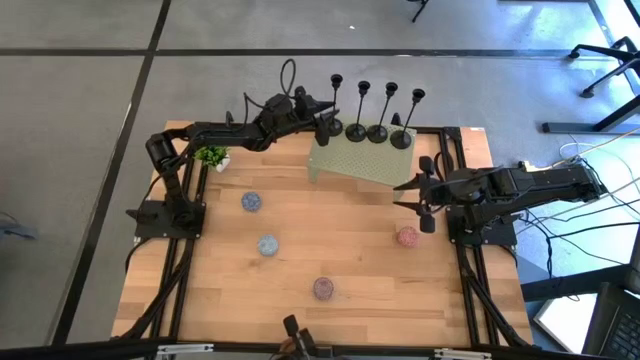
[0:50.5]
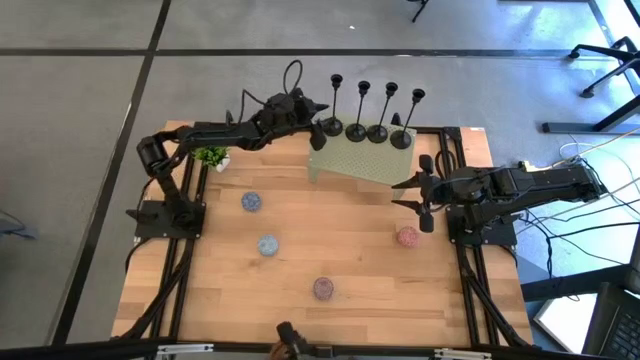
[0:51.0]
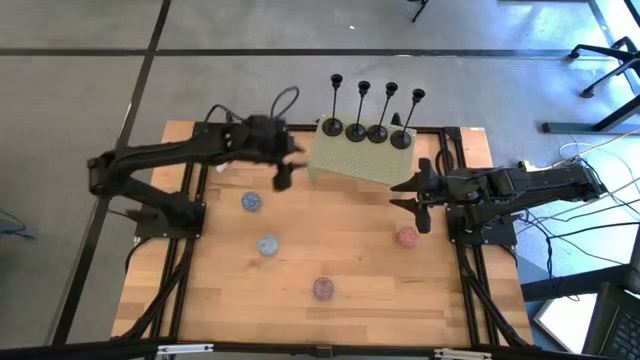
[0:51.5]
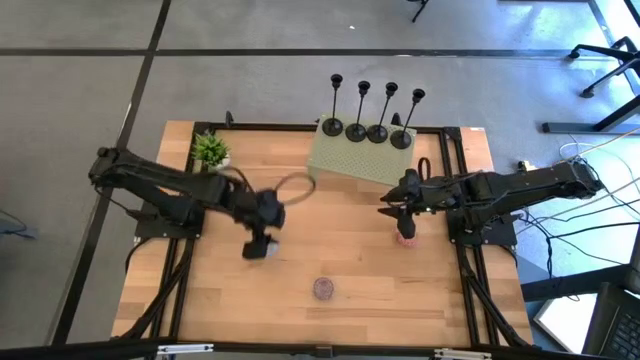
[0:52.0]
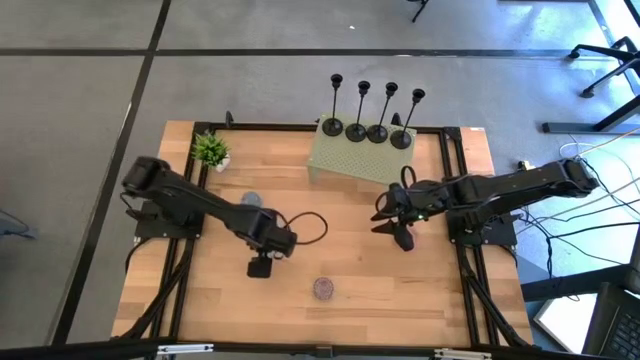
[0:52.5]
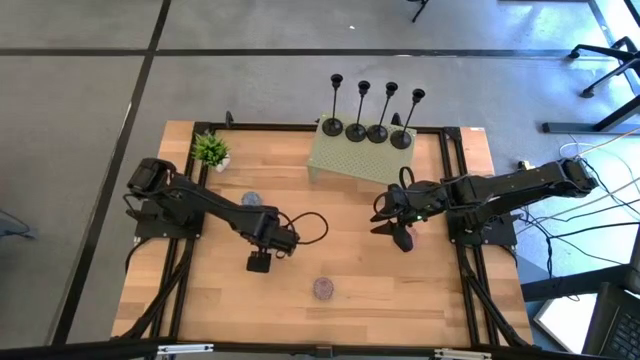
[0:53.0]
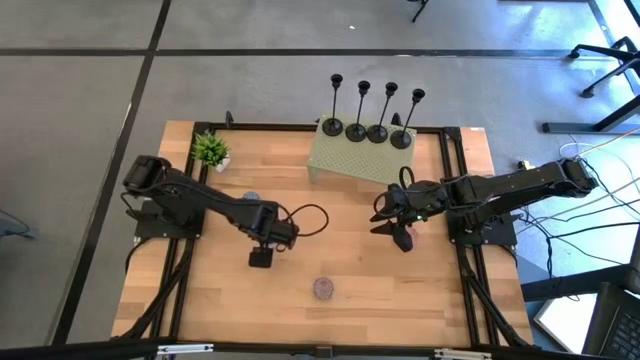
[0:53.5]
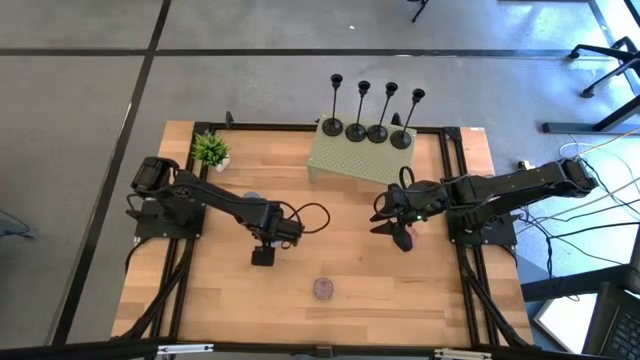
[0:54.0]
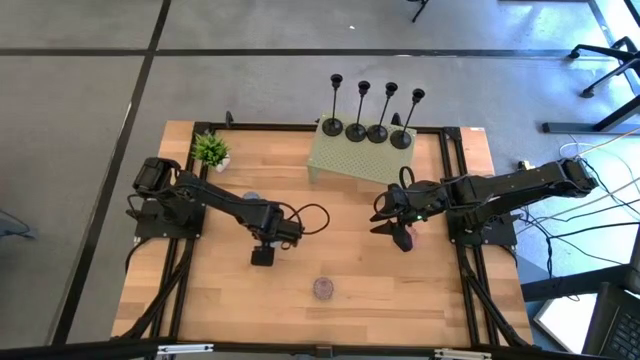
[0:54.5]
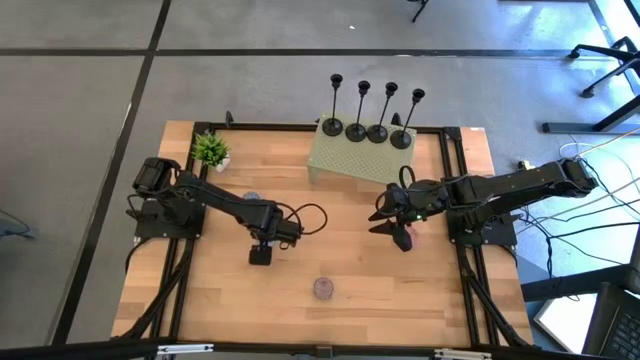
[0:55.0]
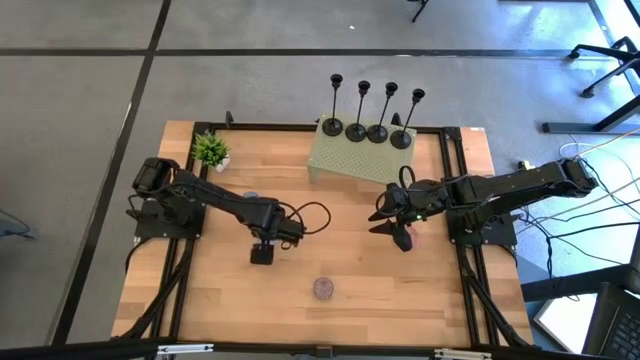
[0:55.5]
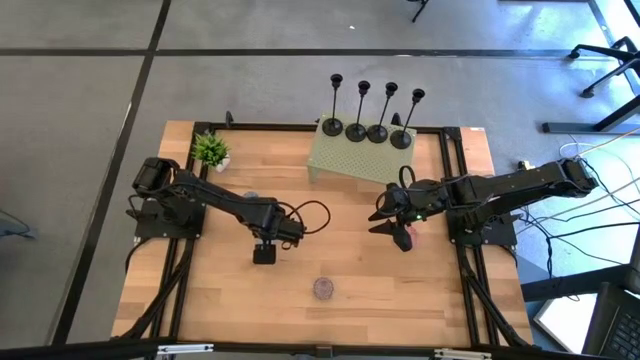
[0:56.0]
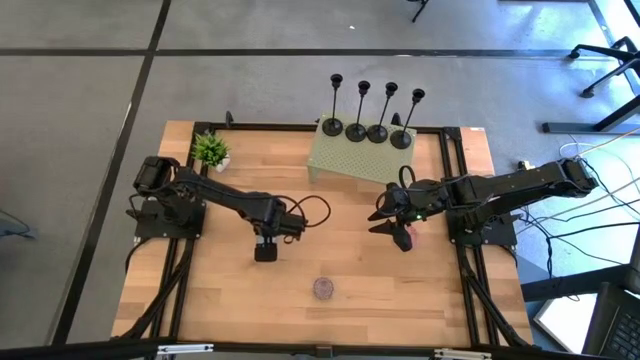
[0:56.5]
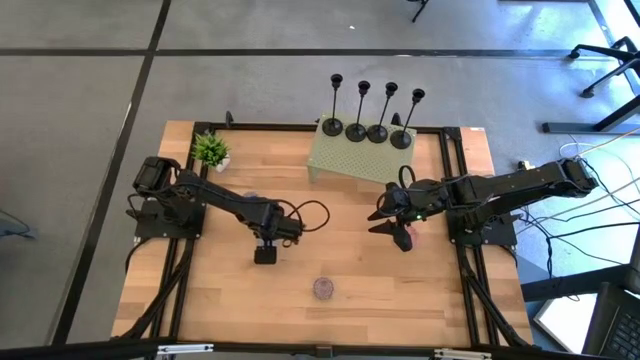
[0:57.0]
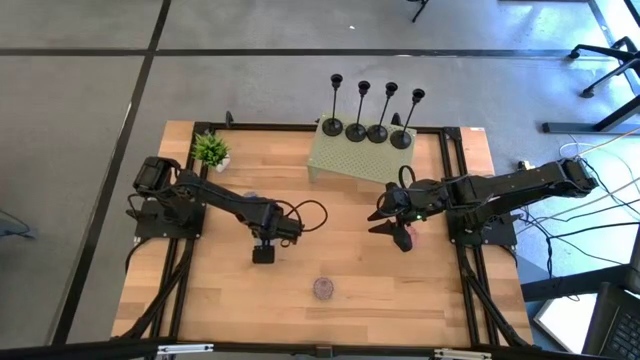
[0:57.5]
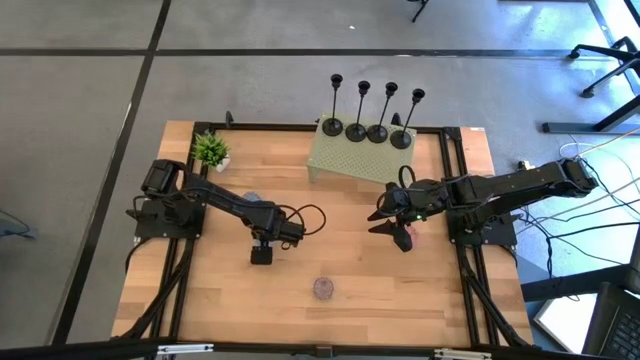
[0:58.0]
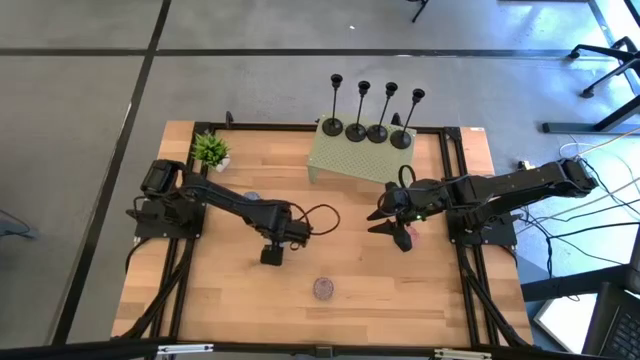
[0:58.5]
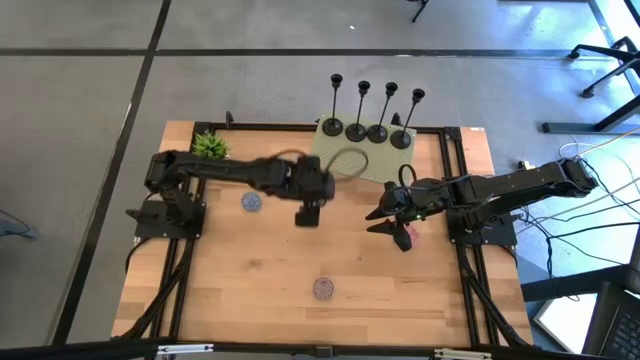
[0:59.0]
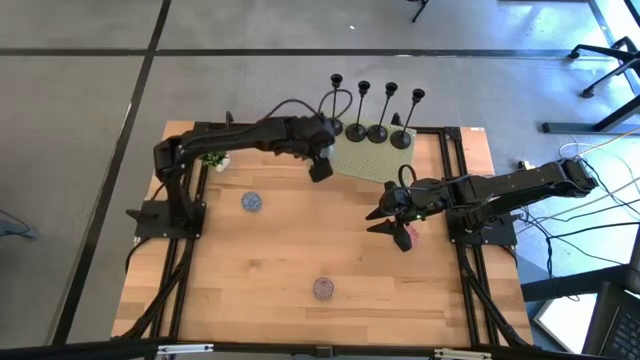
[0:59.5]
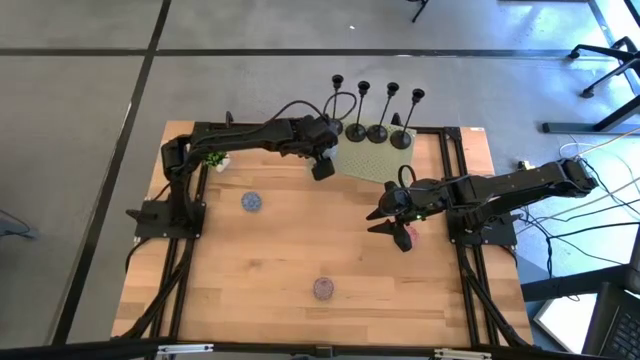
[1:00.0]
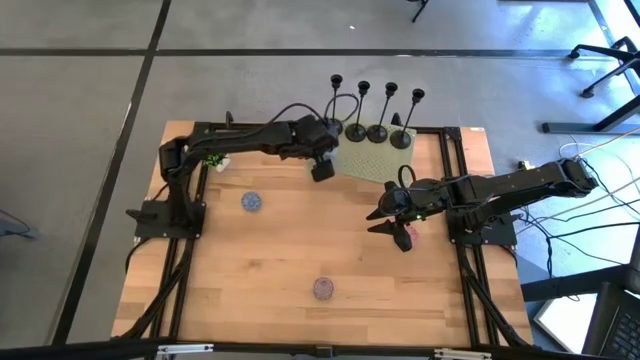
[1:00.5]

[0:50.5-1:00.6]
Task: Pick & Place candle stick holders
Put the patterned light blue scented candle on the shelf aligned with the black candle holder

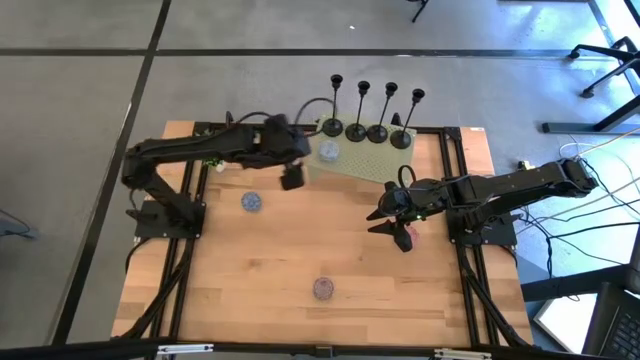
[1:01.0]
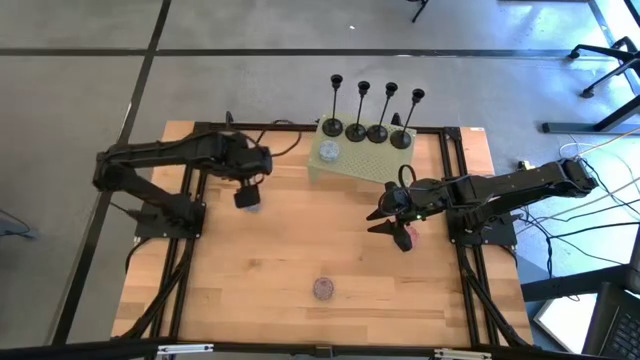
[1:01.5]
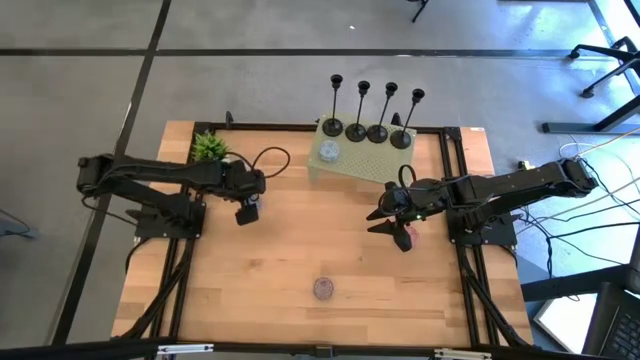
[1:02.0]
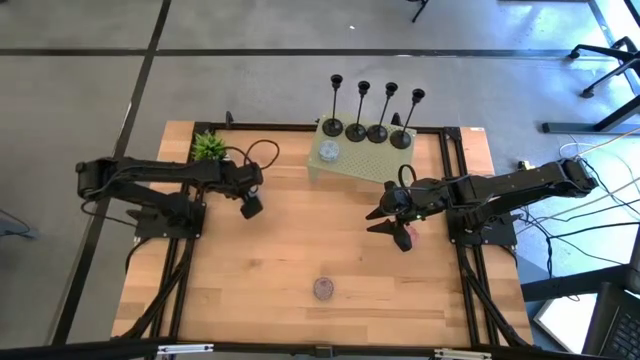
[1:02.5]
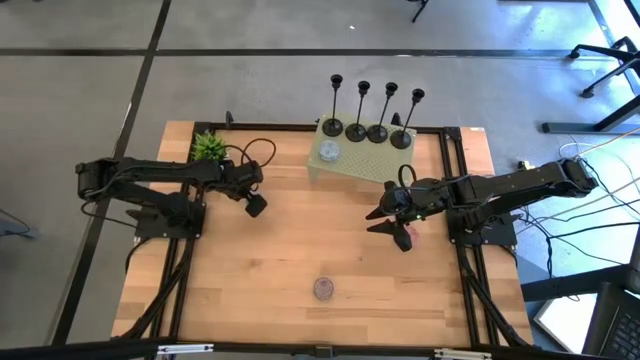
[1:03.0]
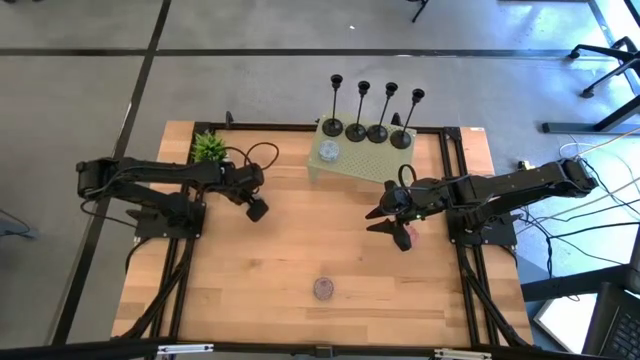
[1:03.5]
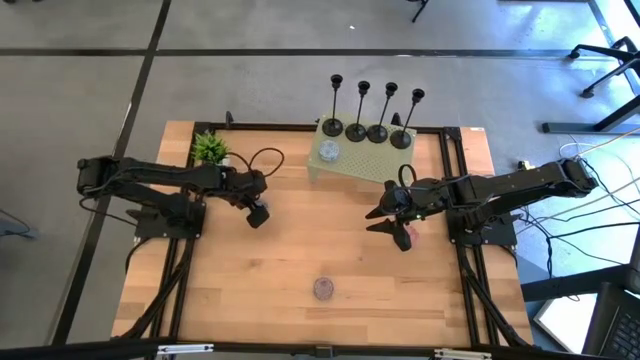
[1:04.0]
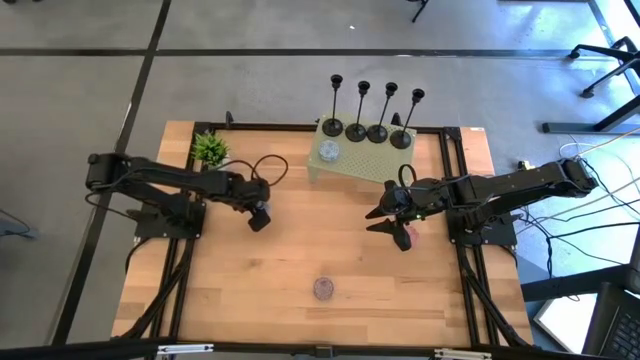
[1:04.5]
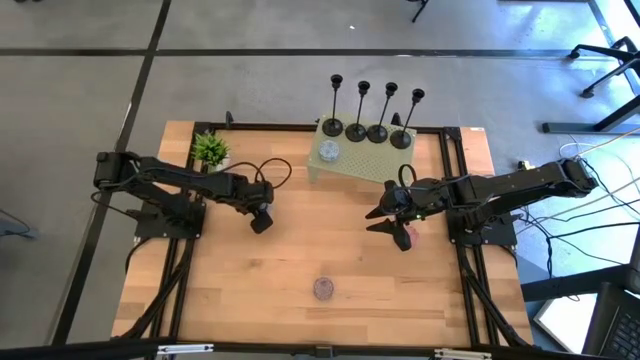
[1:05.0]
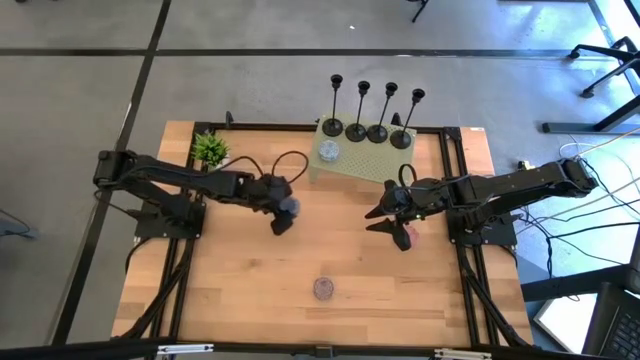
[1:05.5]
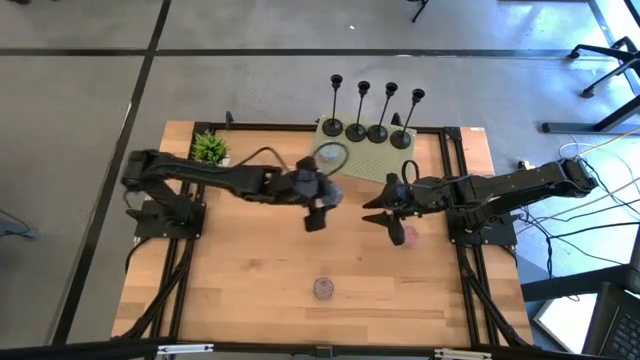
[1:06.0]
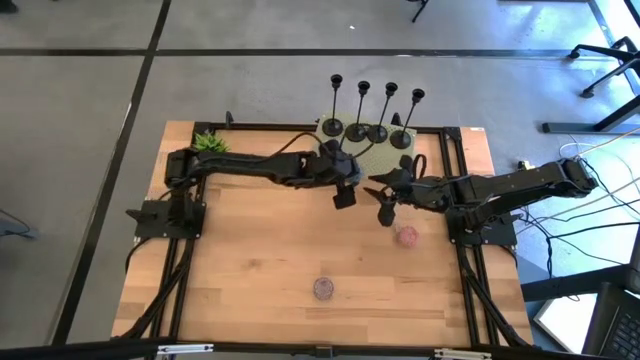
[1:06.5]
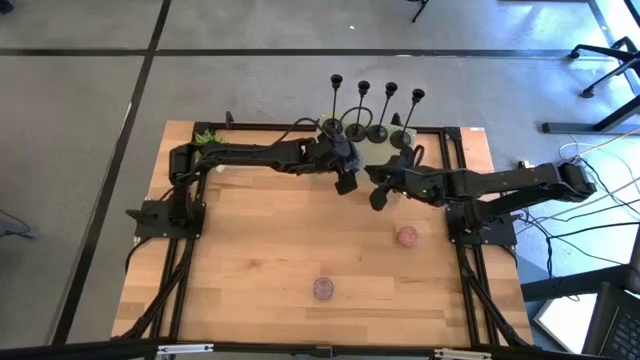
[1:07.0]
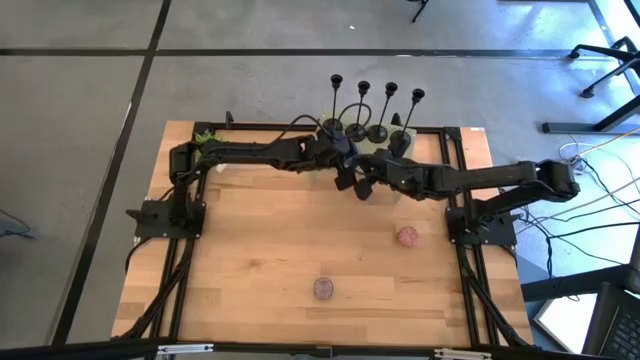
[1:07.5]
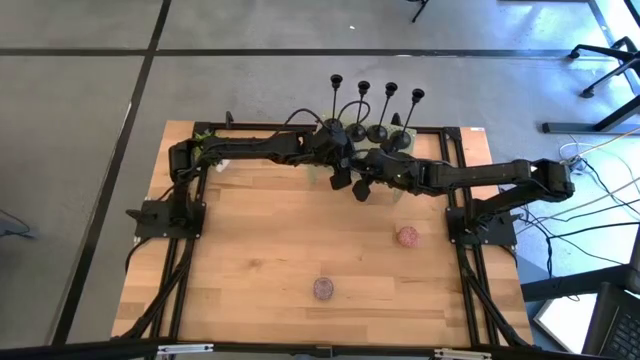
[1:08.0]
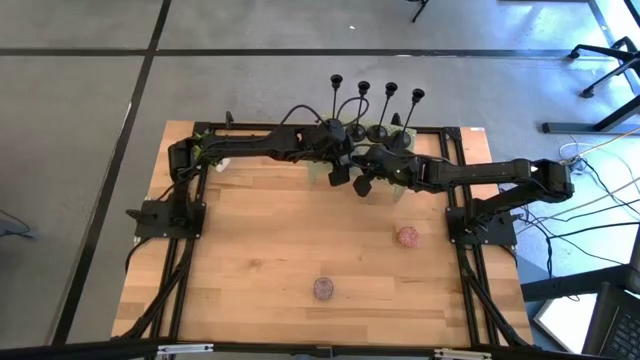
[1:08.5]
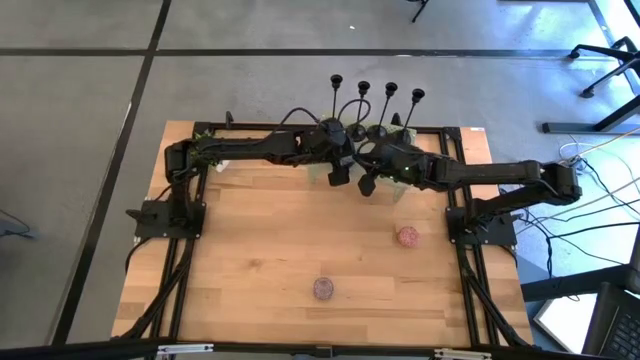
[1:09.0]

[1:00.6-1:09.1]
Put the patterned dark blue scented candle on the shelf aligned with the black candle holder

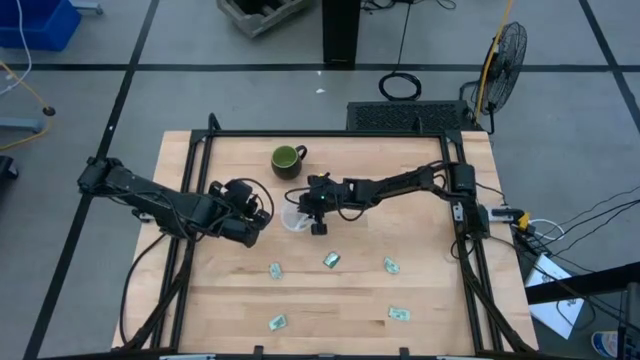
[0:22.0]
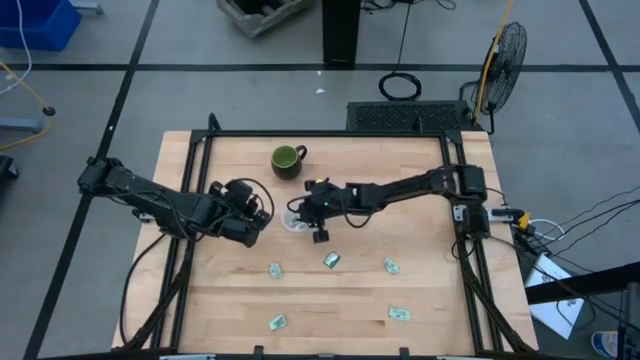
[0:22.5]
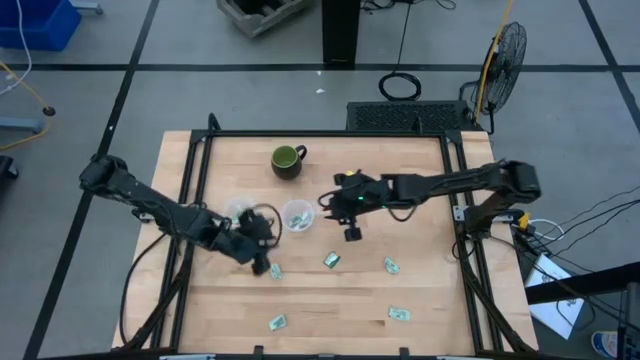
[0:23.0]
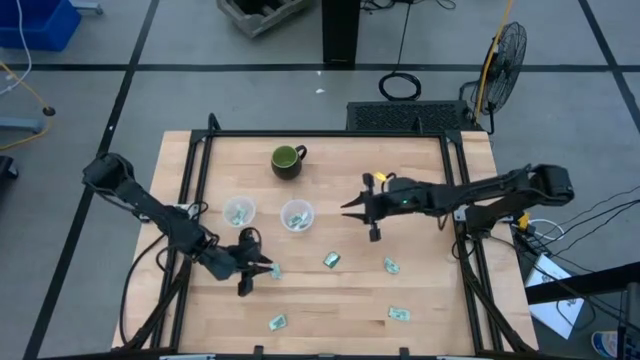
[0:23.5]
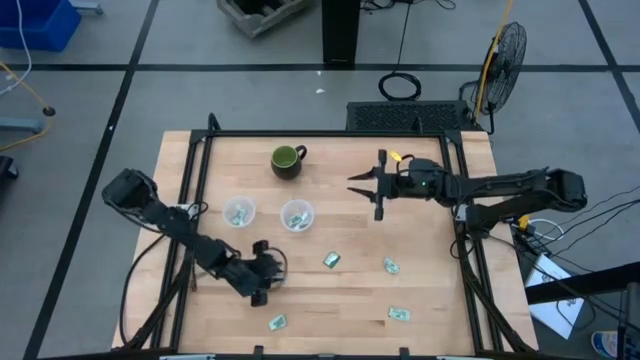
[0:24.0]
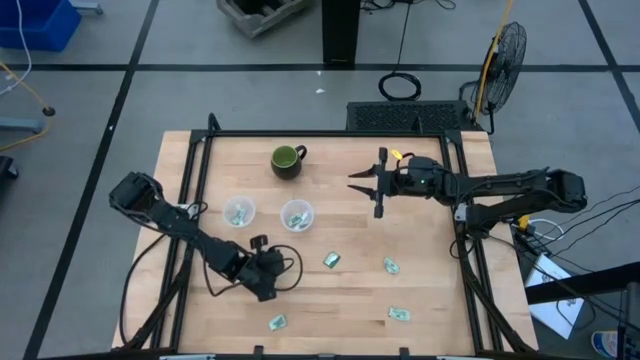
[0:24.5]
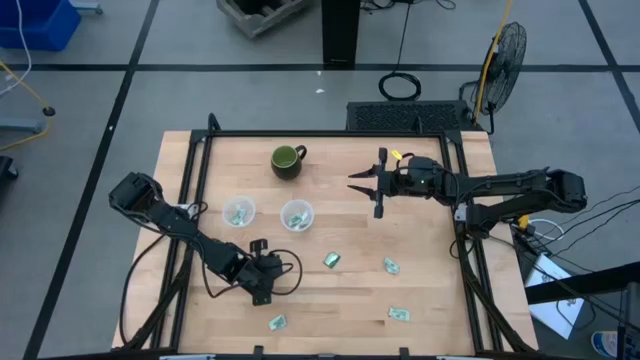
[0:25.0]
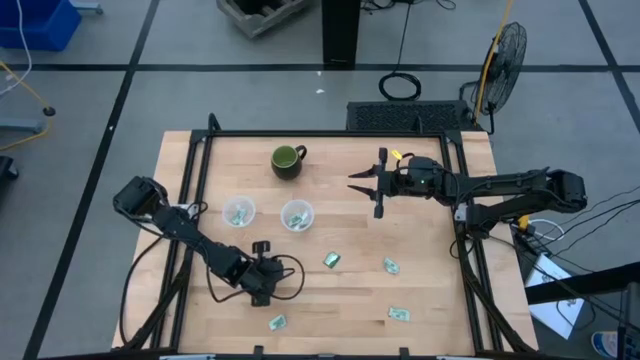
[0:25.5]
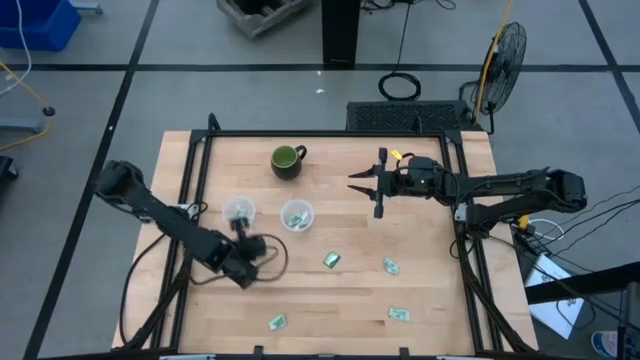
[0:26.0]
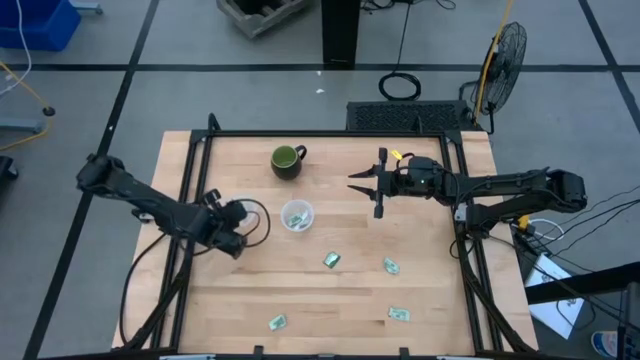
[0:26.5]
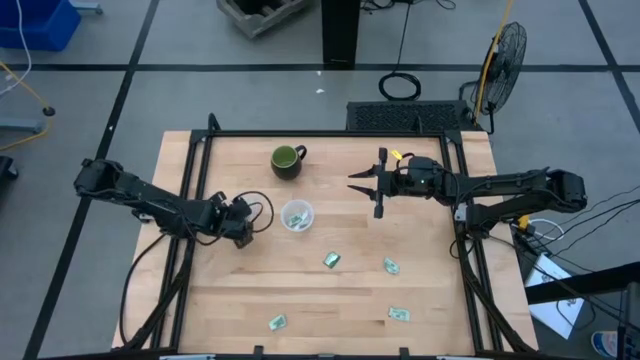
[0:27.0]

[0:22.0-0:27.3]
Task: Pick and place Stevia / Truvia into bins
Put the stevia pocket in the left plastic container
